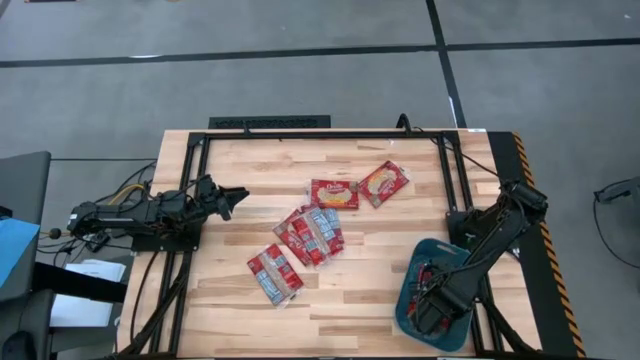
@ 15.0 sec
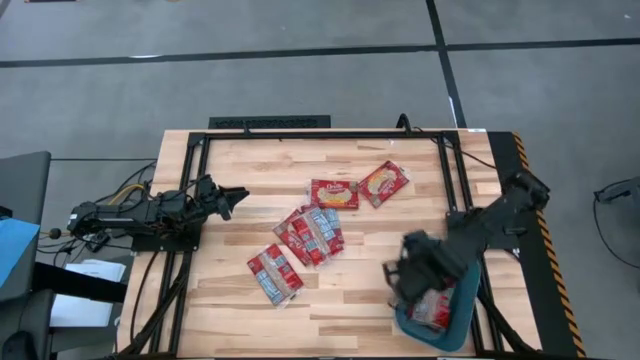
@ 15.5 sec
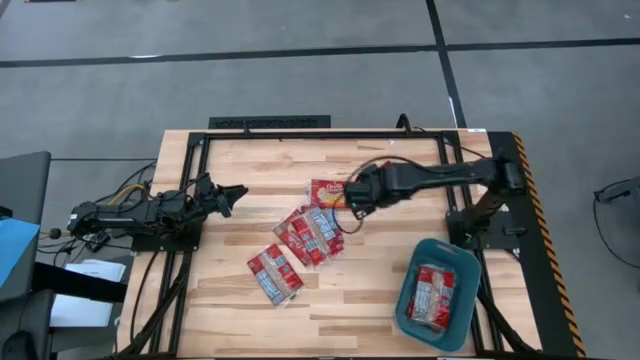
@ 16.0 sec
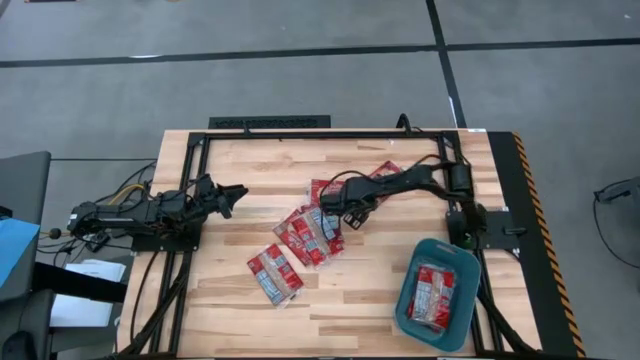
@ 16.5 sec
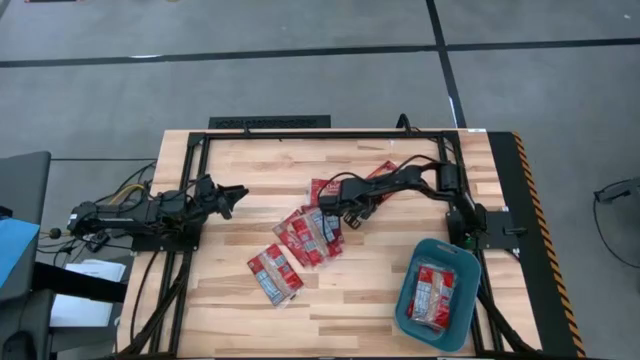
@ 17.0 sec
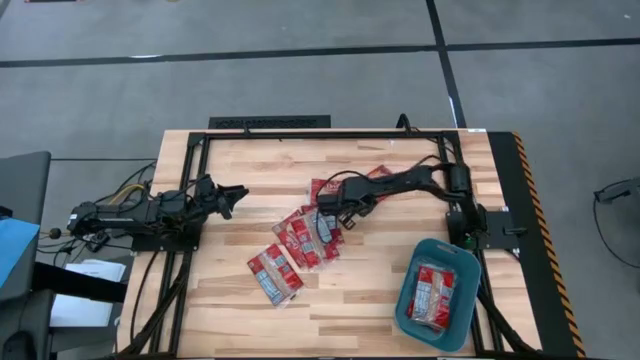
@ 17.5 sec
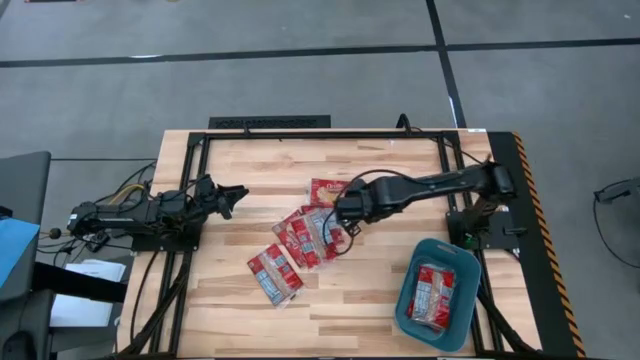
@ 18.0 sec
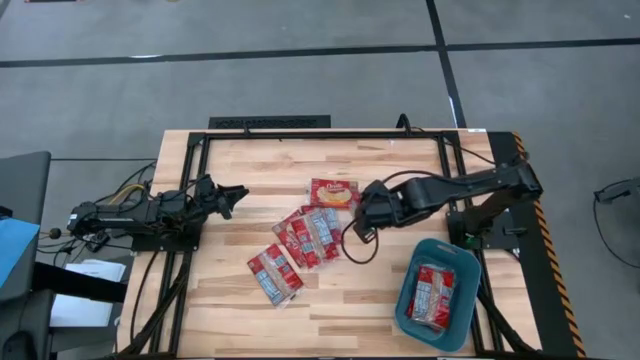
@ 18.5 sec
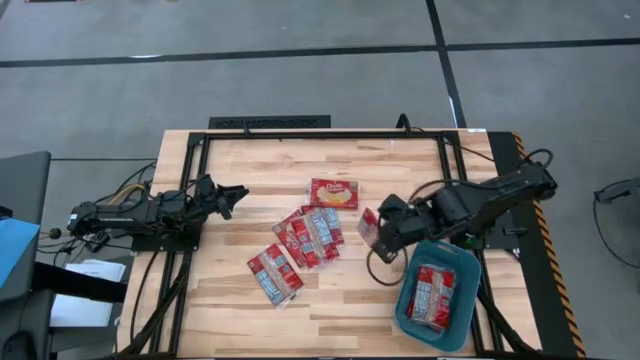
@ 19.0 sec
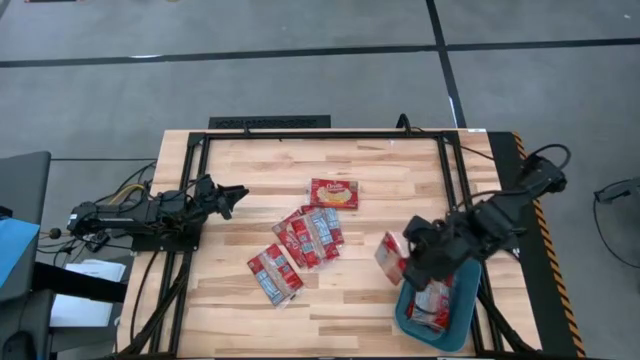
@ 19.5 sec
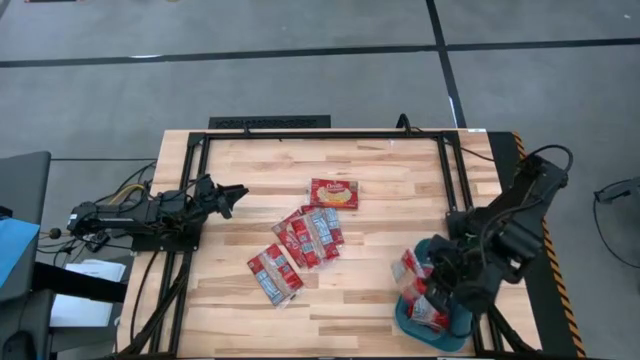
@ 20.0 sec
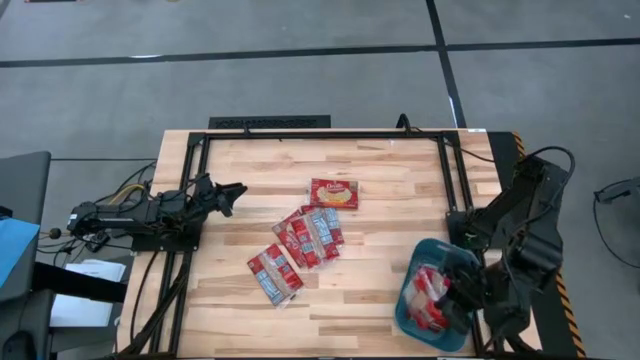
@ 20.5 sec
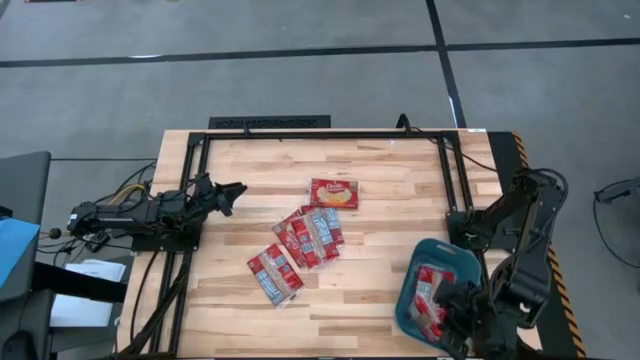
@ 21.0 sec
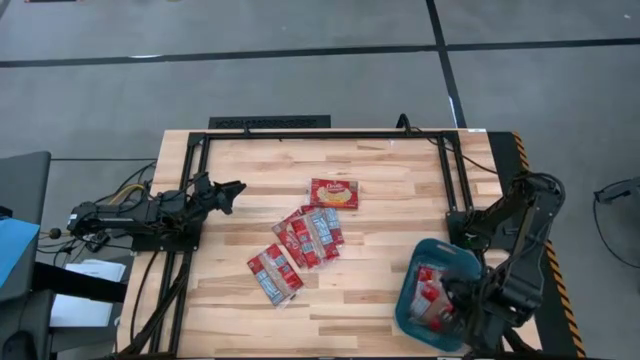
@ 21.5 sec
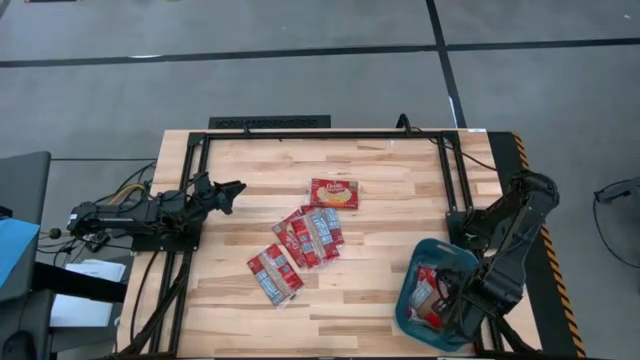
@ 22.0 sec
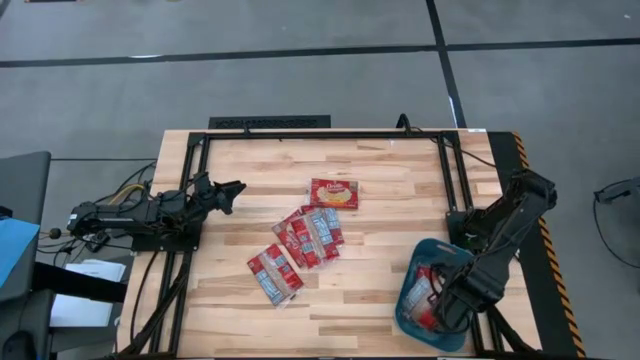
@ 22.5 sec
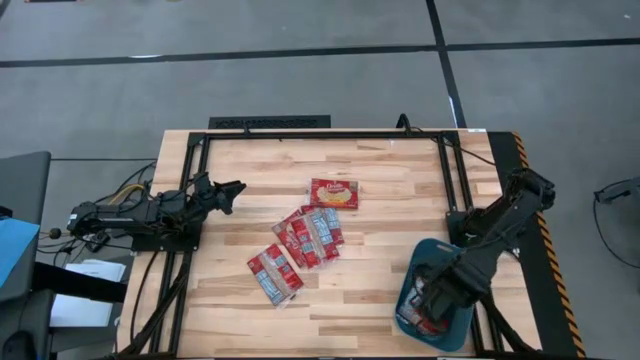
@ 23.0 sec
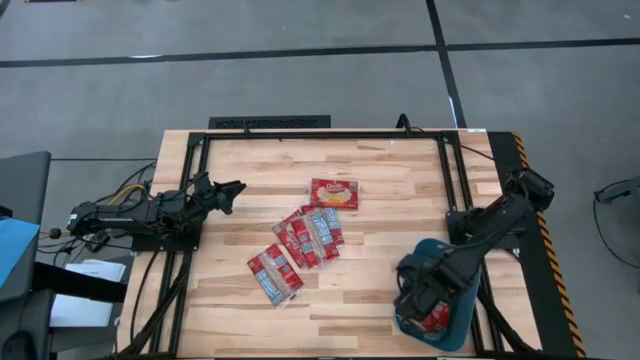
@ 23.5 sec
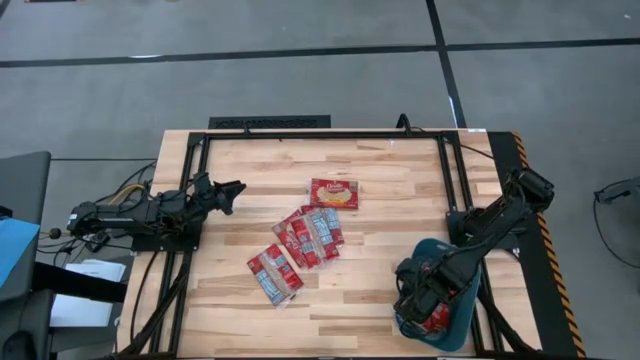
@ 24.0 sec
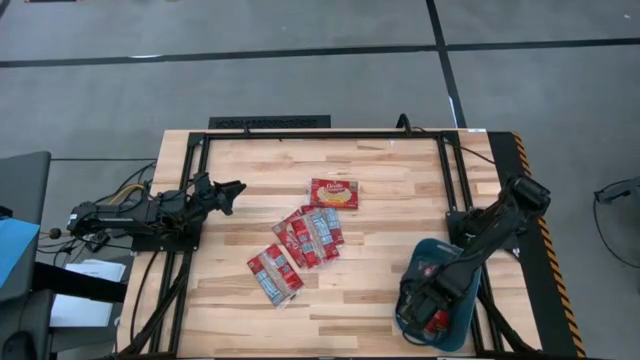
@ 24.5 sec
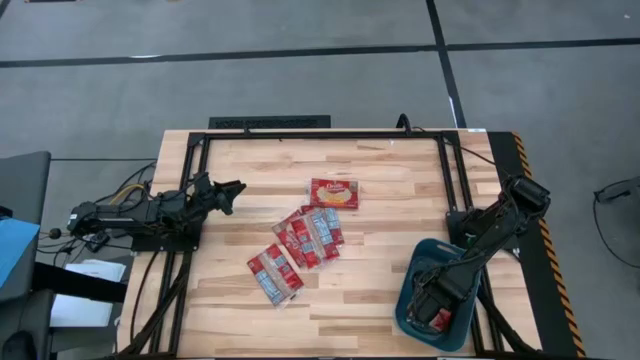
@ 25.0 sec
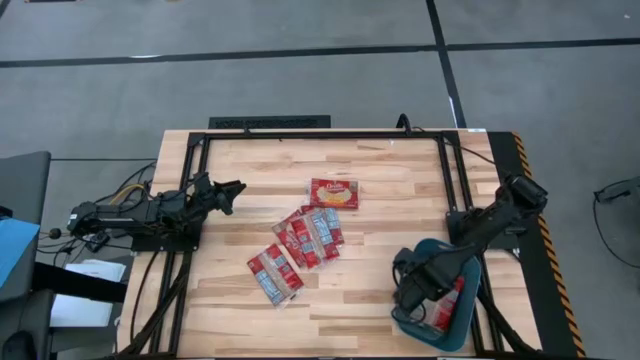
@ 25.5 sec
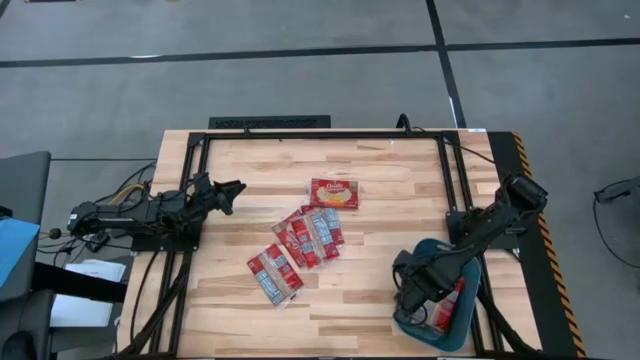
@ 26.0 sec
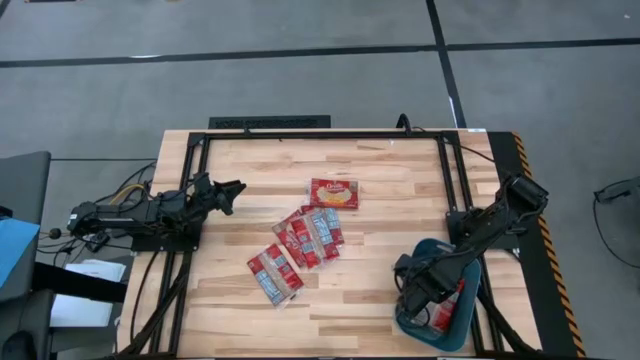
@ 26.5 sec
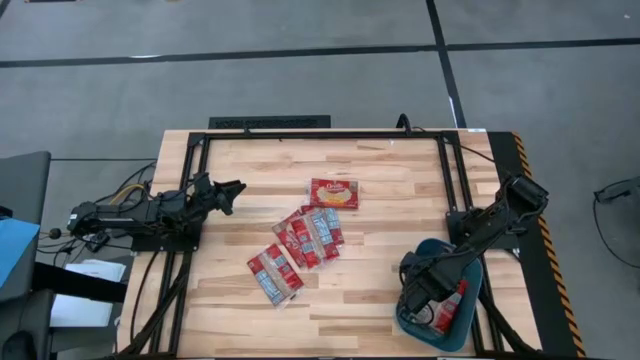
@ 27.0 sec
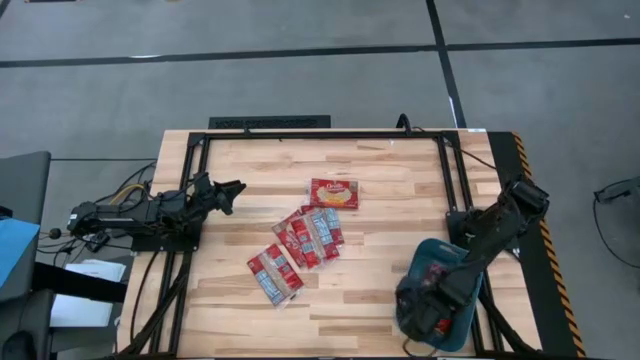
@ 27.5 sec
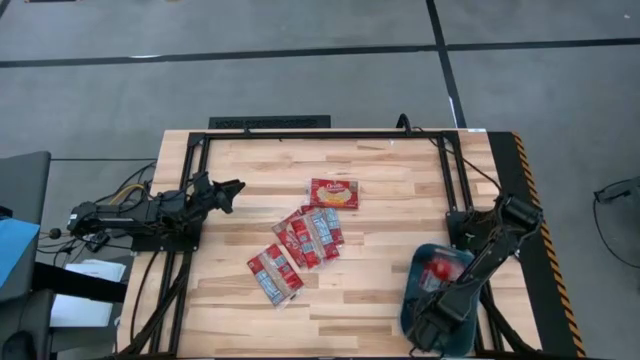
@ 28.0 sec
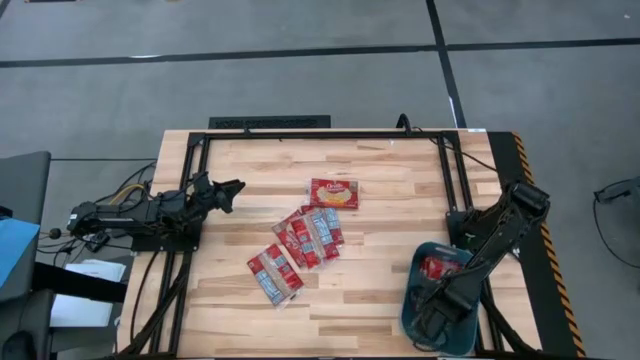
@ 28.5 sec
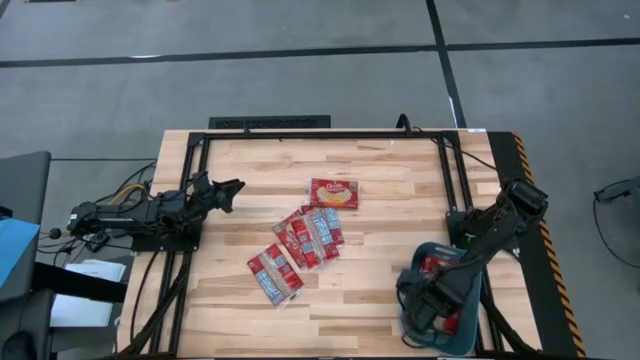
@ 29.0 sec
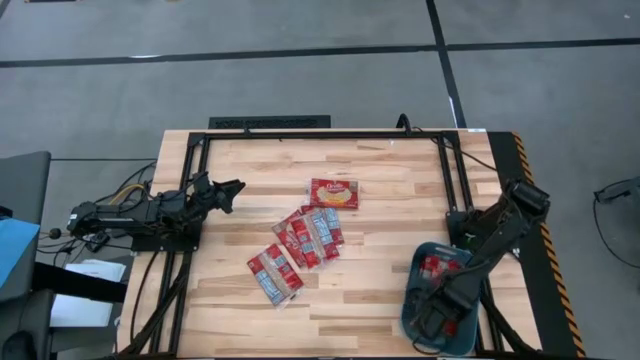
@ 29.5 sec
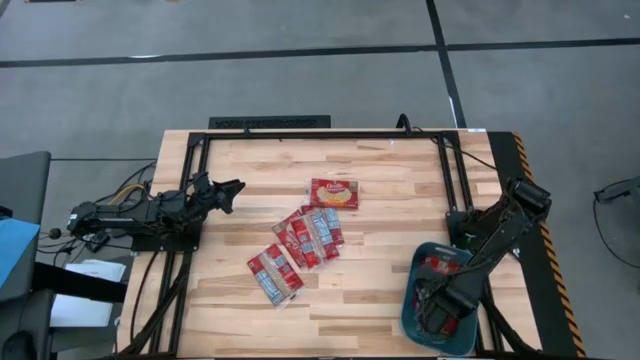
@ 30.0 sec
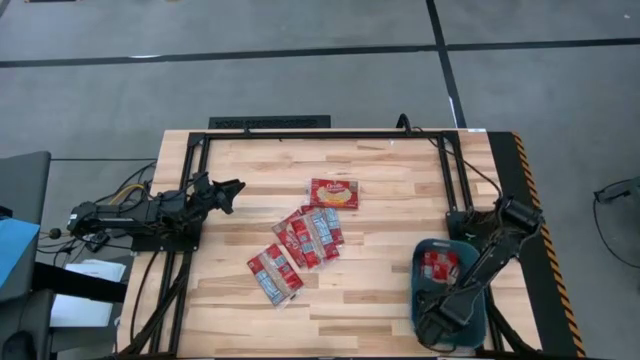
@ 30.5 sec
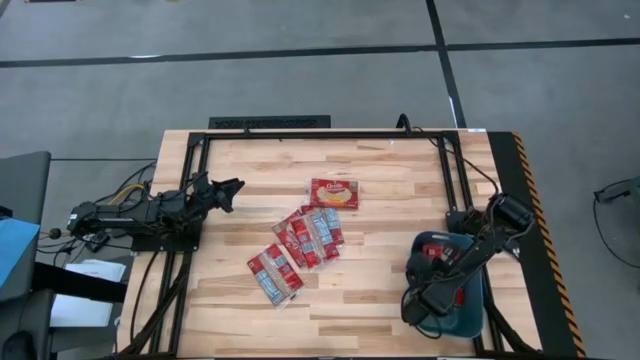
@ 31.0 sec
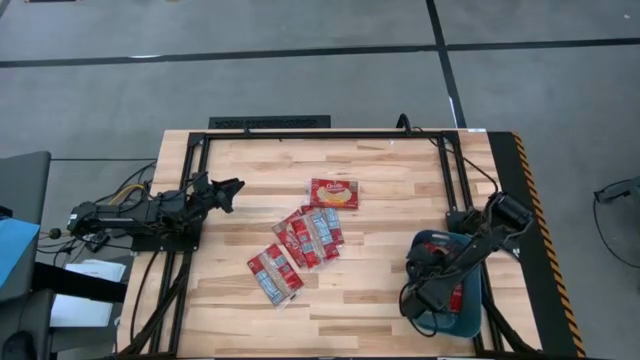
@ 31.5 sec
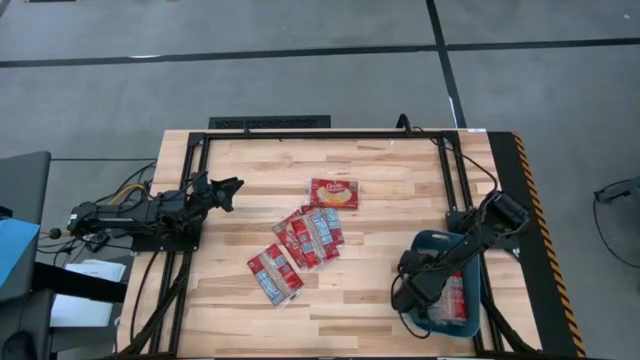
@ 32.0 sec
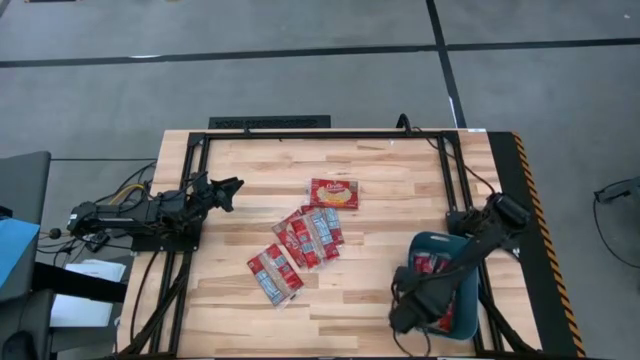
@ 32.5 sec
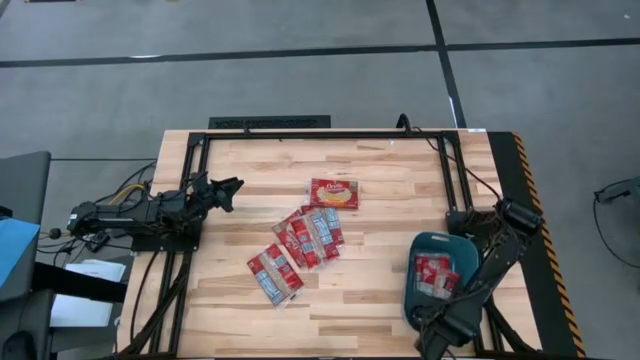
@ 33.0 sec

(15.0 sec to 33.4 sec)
Task: Sort popcorn bags into baskets
Put the popcorn bag into the blue bin
